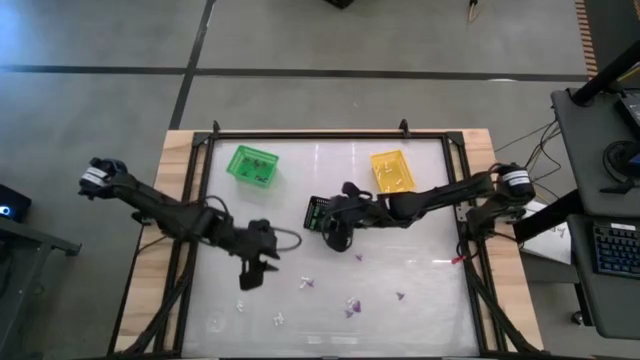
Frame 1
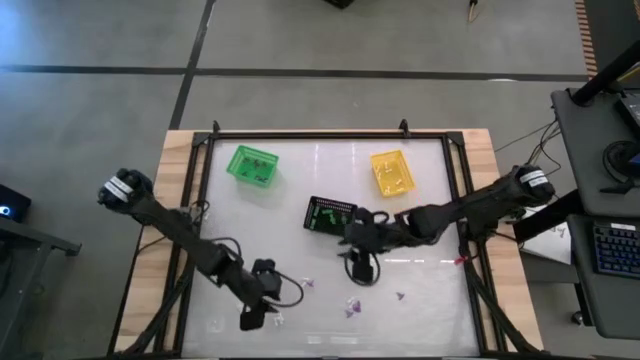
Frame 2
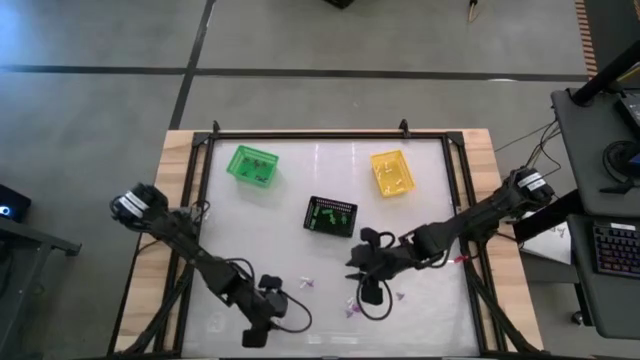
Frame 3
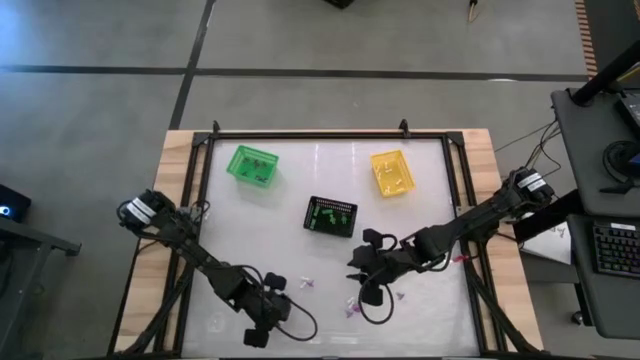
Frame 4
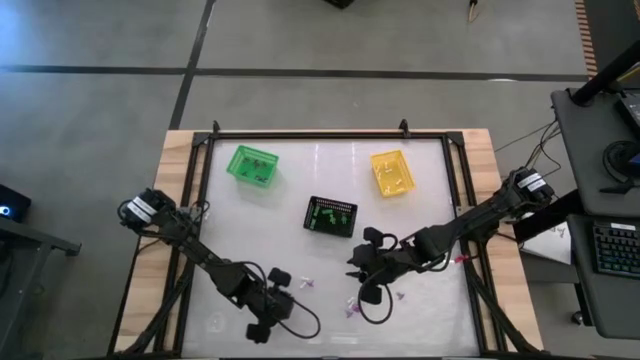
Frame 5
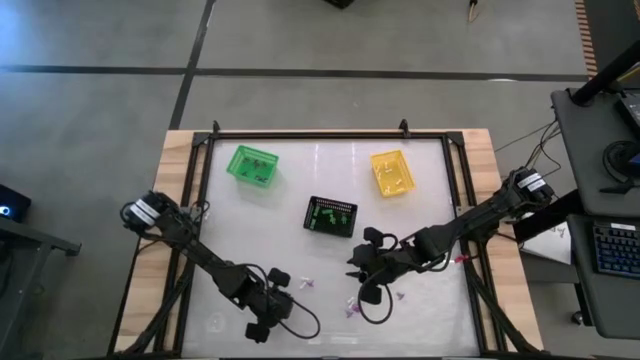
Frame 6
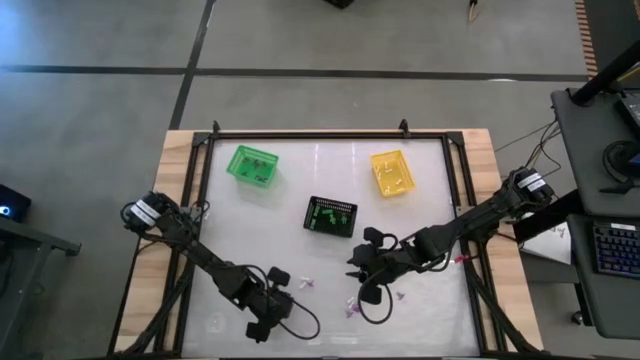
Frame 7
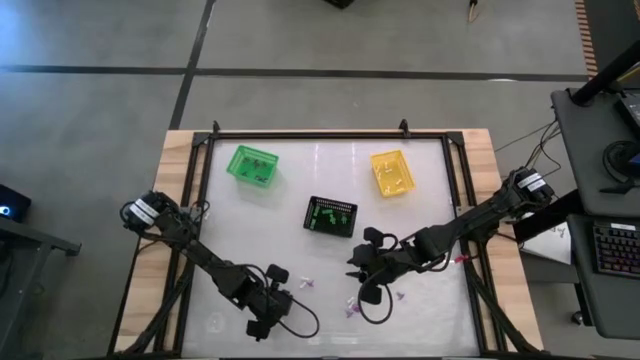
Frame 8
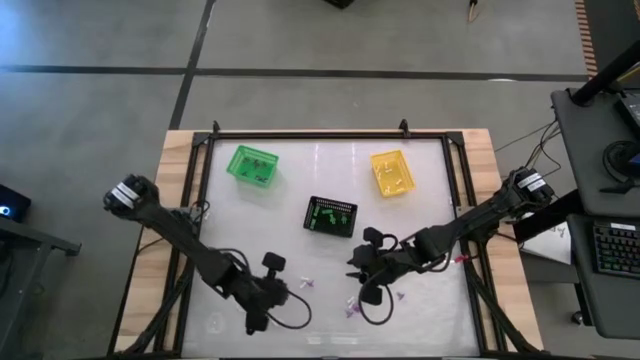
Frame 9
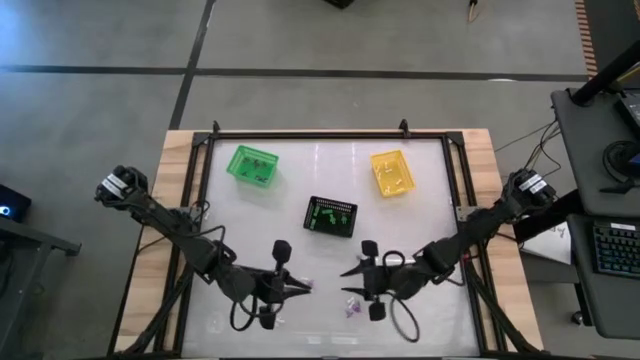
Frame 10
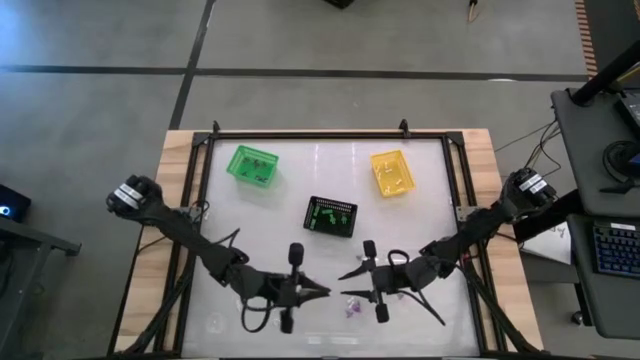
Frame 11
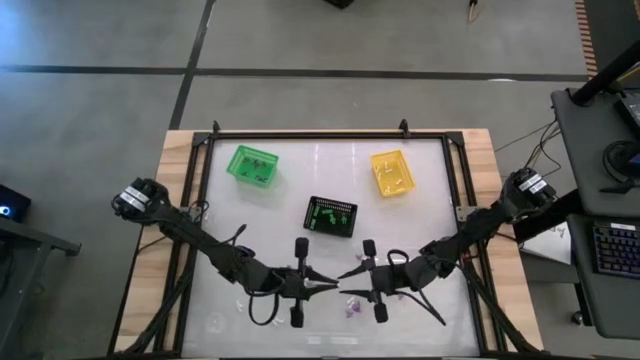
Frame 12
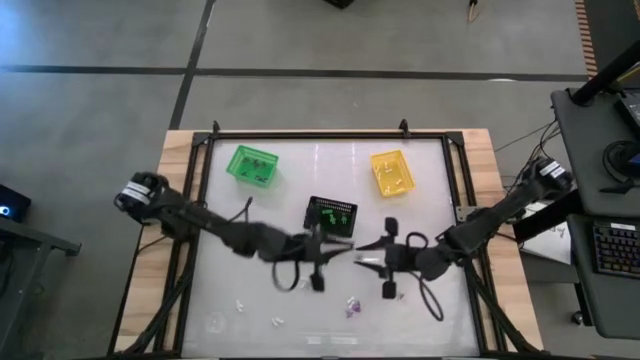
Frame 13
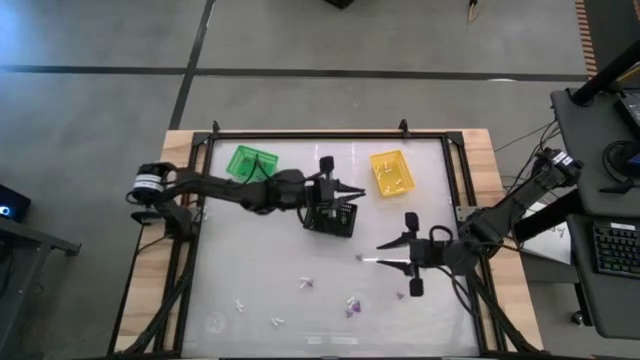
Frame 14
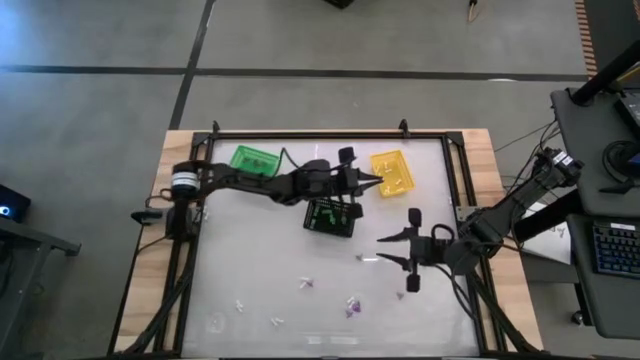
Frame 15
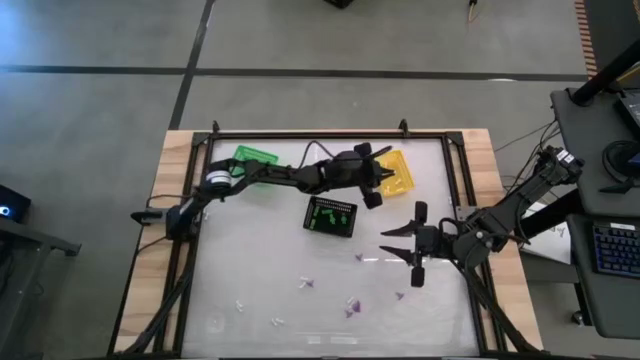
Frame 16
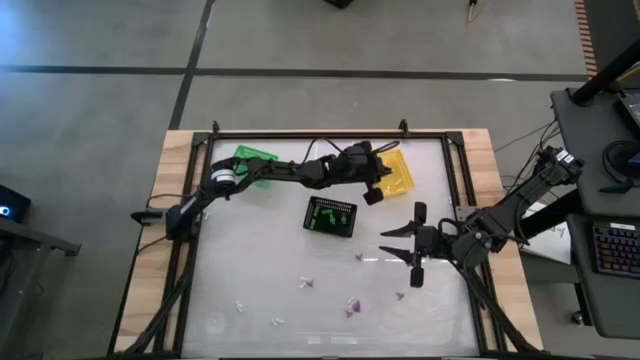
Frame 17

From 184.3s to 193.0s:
Task: Sort Halloween decoration
Put the white bone into the yellow bin

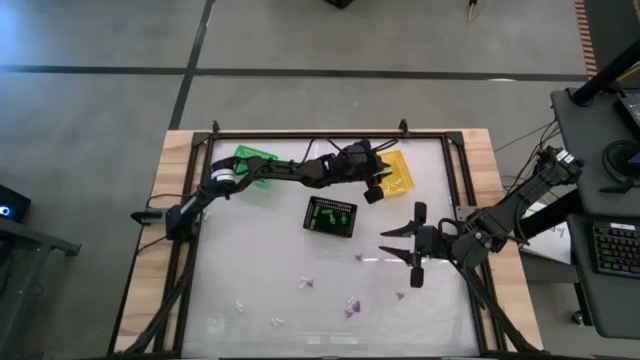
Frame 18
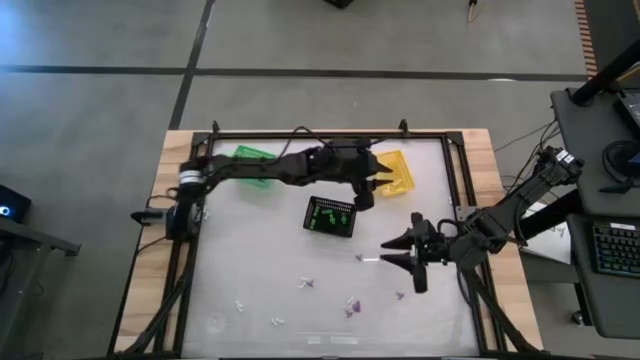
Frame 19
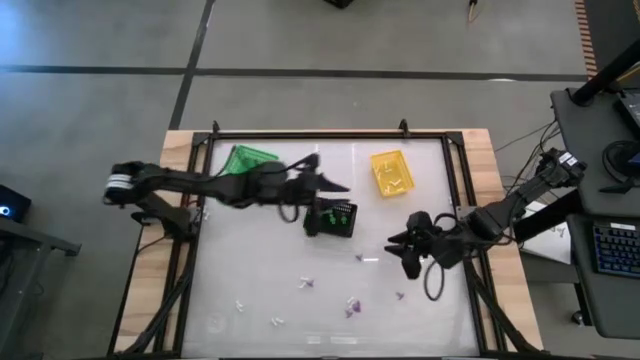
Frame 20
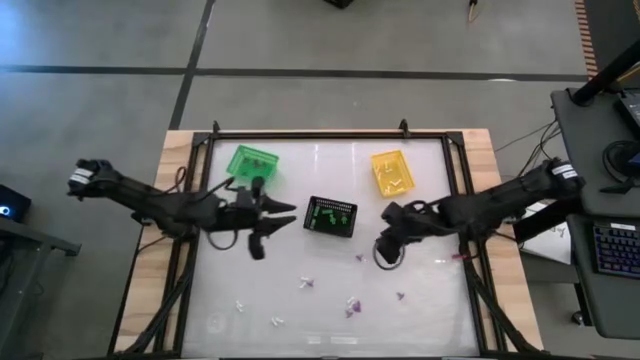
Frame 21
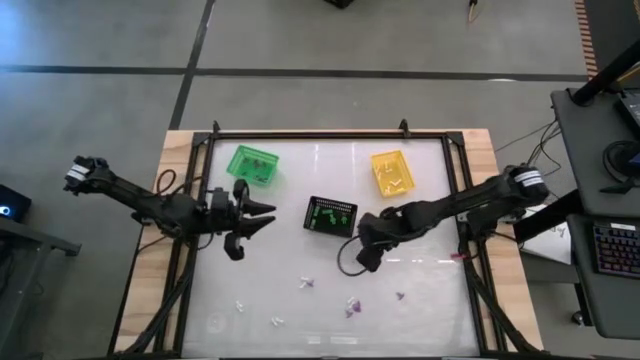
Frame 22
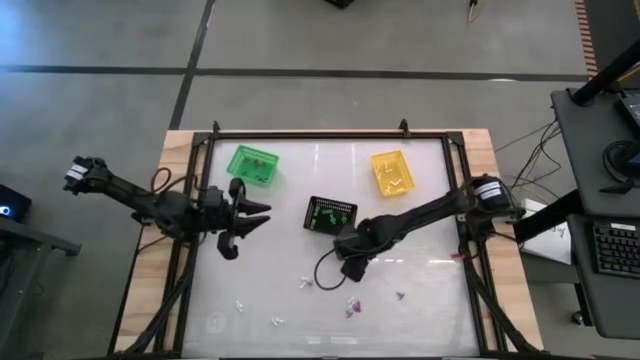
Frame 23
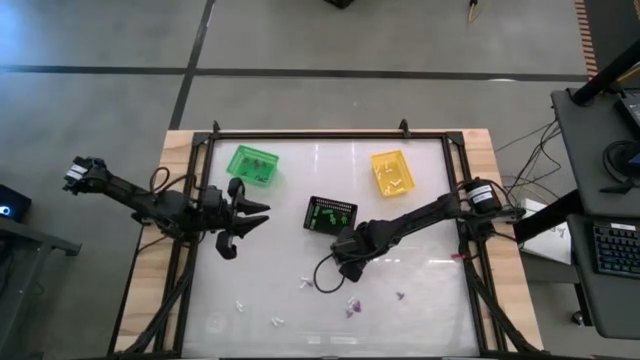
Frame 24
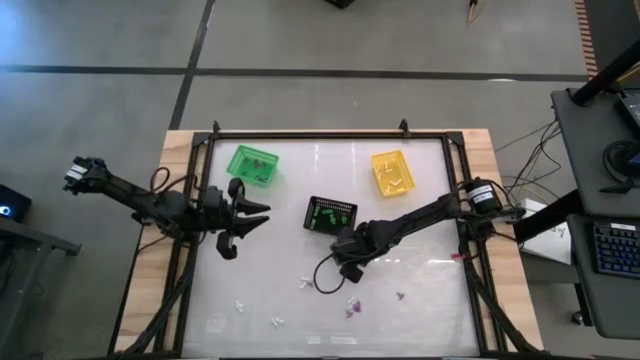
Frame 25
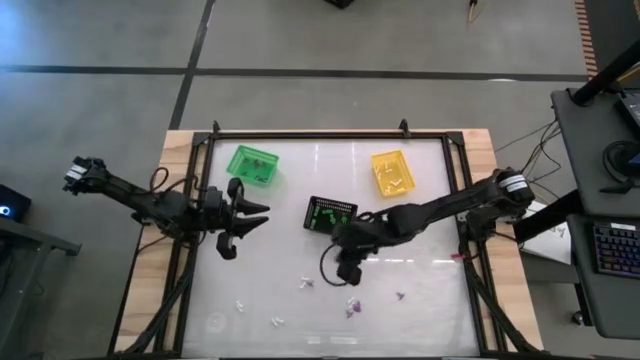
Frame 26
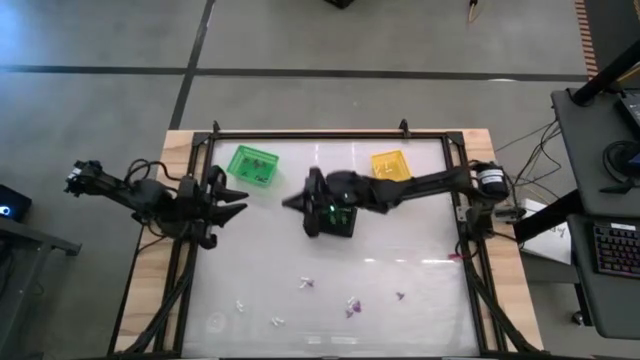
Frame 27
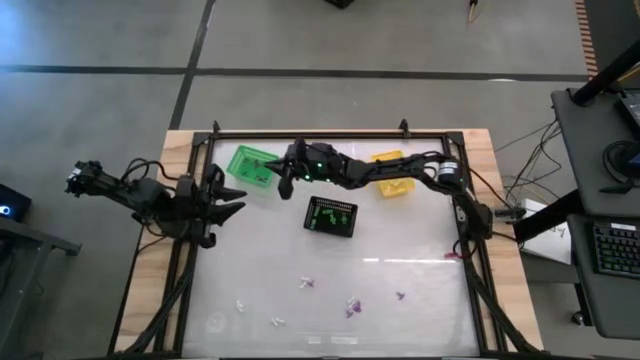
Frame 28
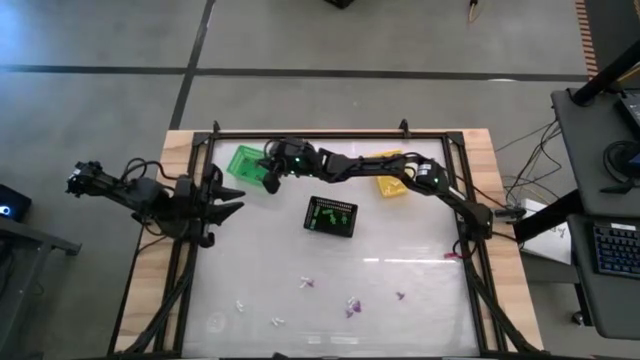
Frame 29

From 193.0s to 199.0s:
Put the purple witch hat toy into the green bin

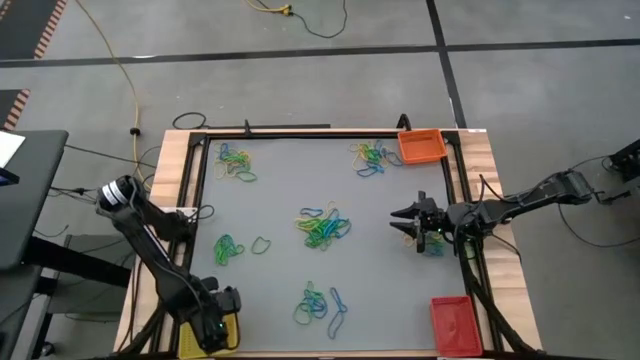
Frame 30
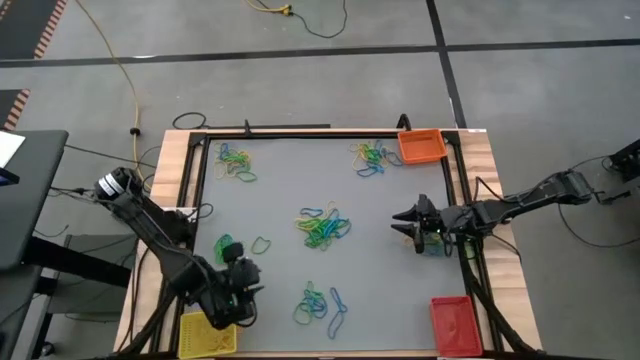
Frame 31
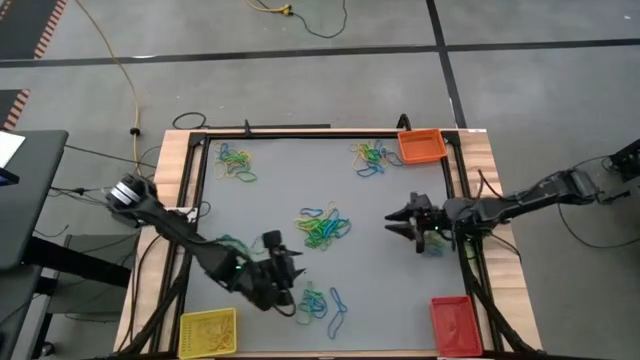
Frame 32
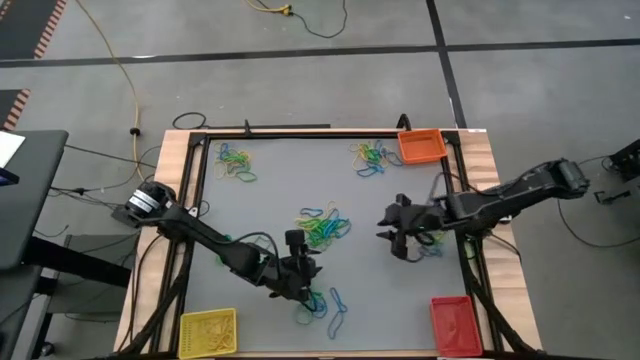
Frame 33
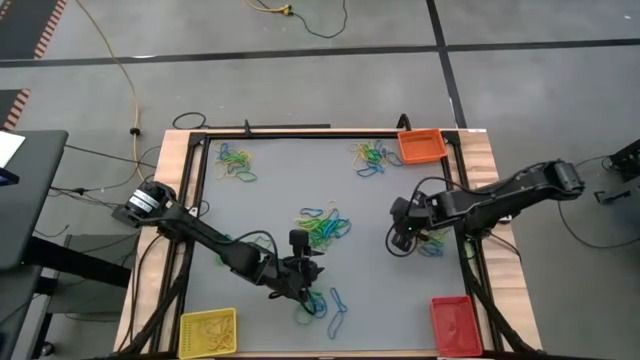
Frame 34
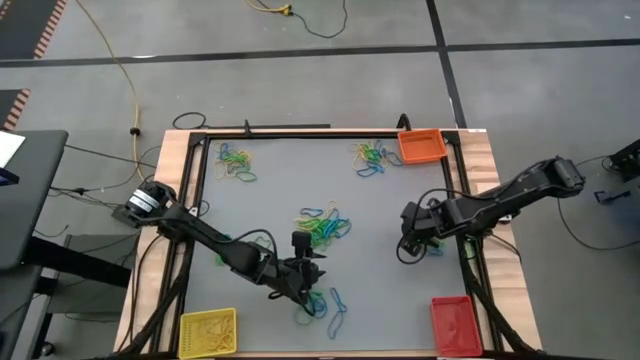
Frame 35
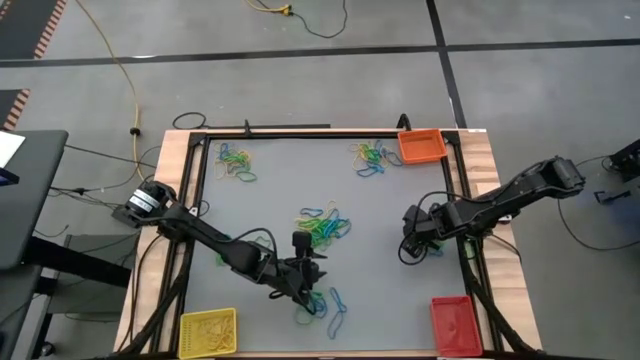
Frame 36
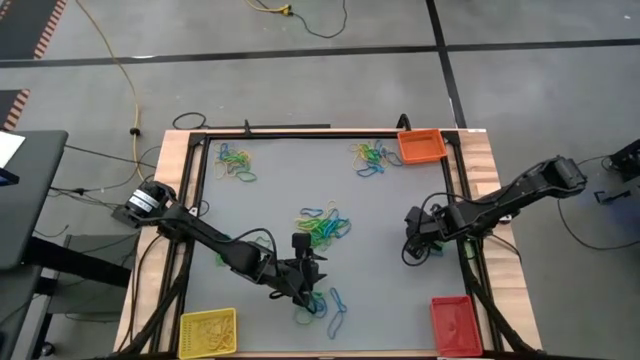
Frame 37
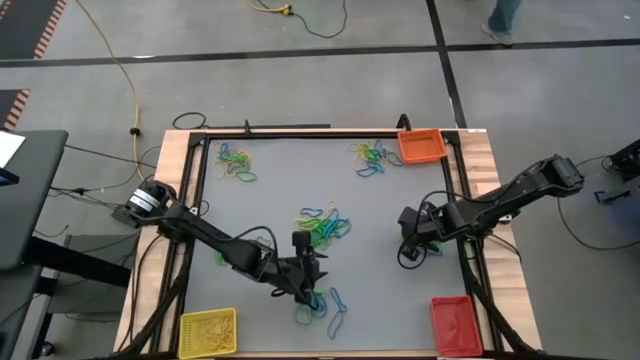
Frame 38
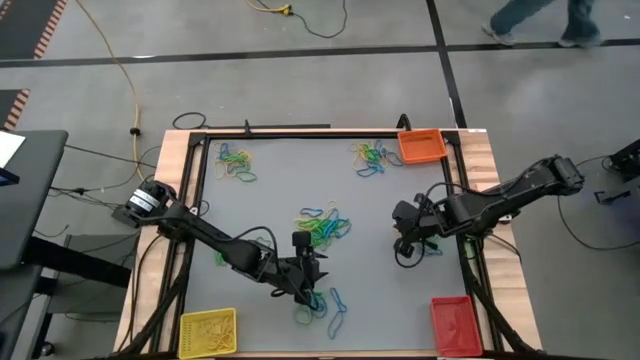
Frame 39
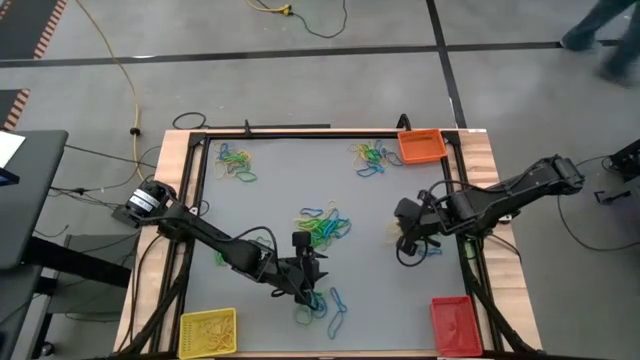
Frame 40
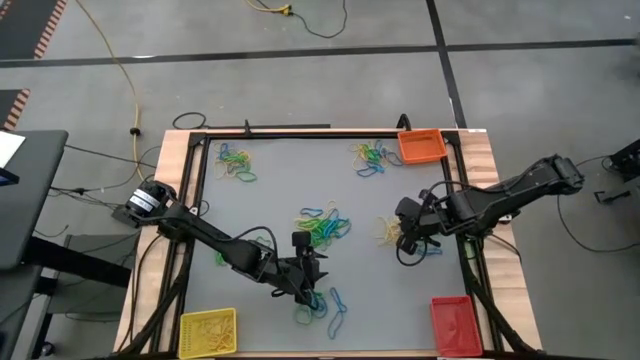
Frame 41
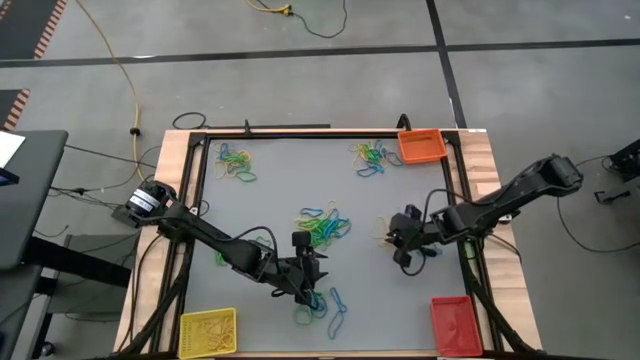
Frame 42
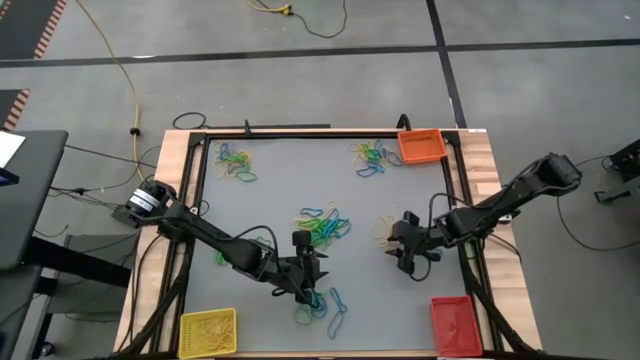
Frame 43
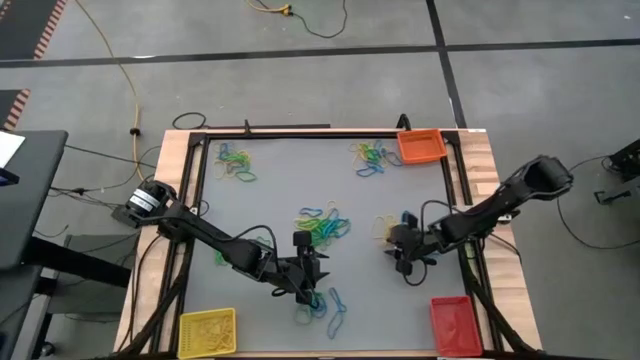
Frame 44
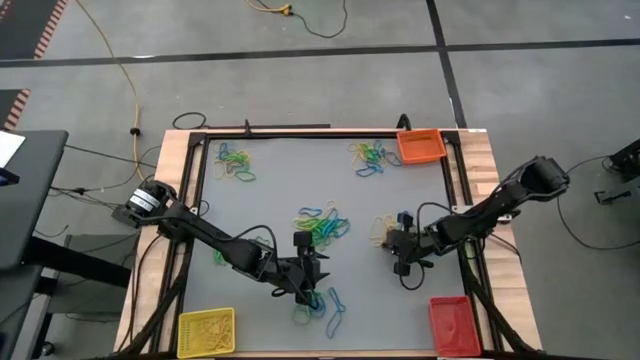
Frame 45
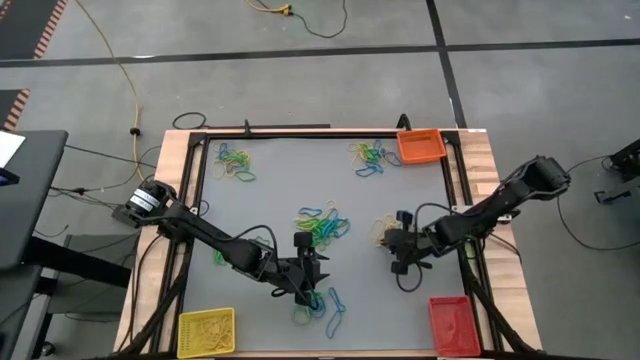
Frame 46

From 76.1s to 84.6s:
Task: Sort rubber bands into baskets
Put the yellow rubber band into the yellow bin
